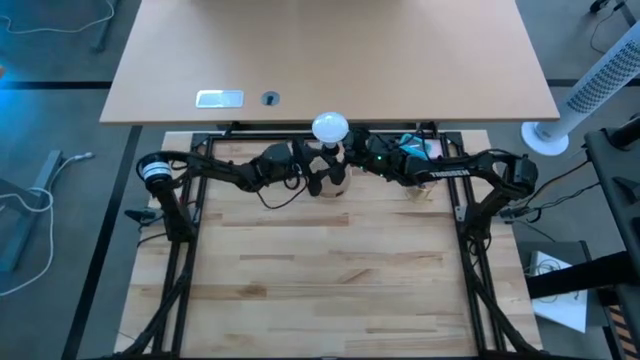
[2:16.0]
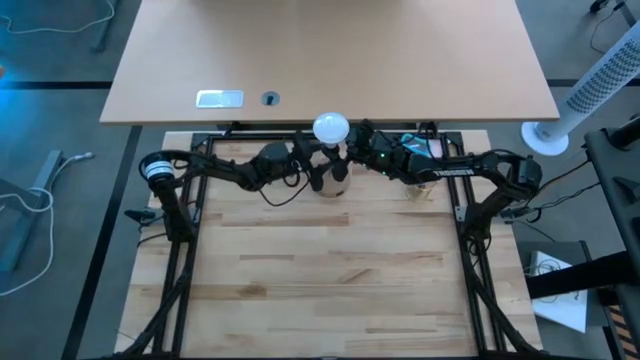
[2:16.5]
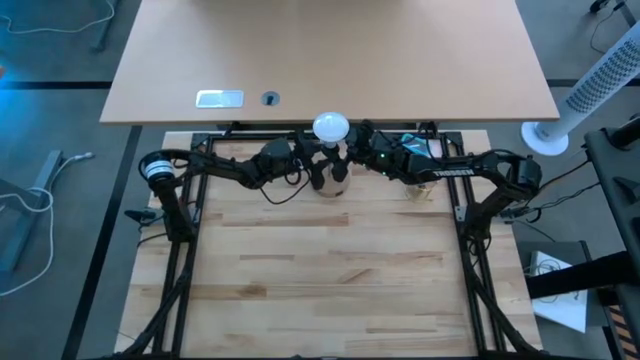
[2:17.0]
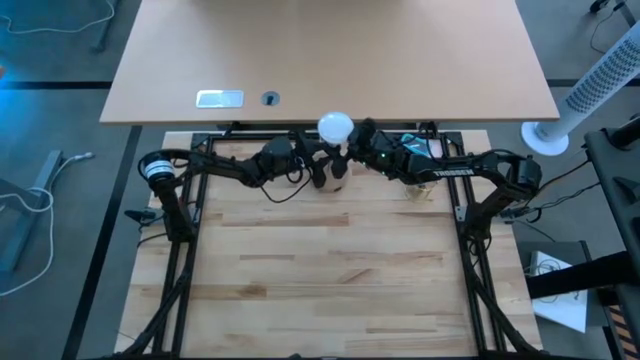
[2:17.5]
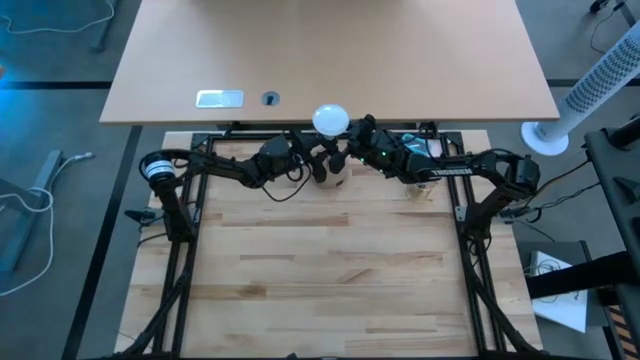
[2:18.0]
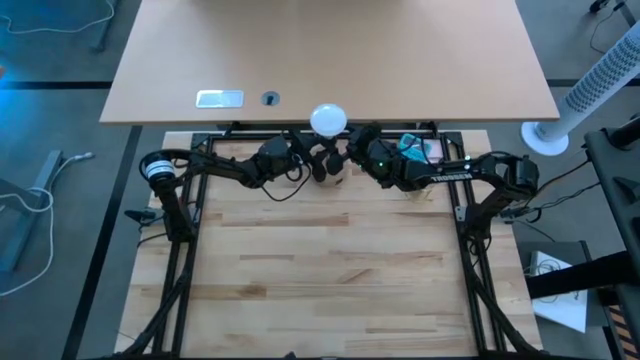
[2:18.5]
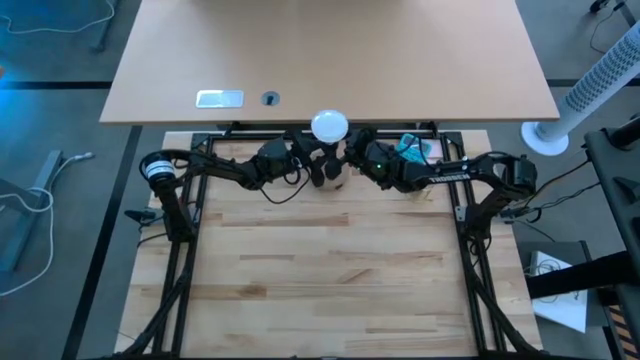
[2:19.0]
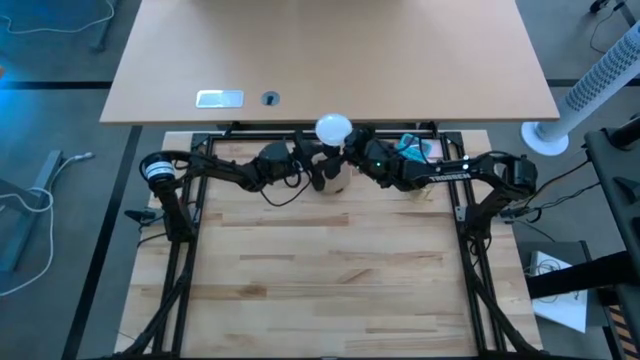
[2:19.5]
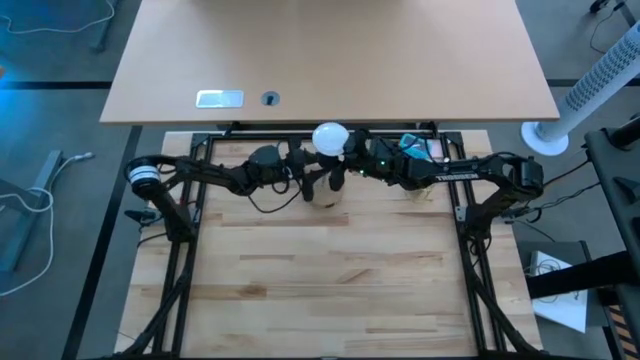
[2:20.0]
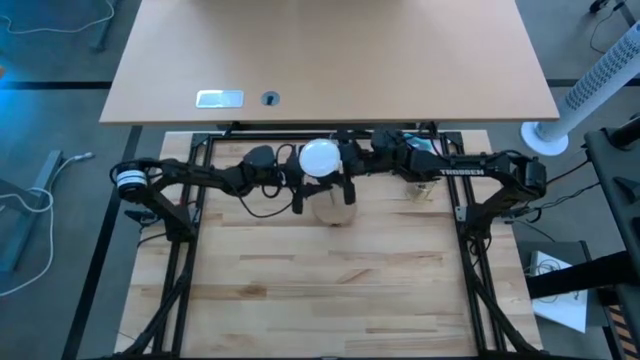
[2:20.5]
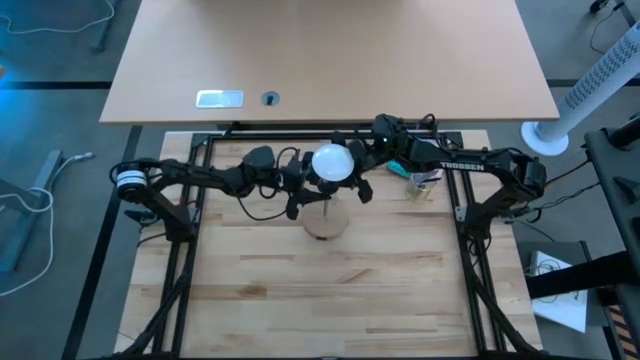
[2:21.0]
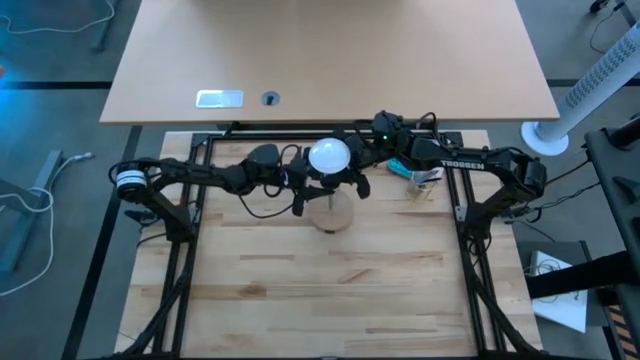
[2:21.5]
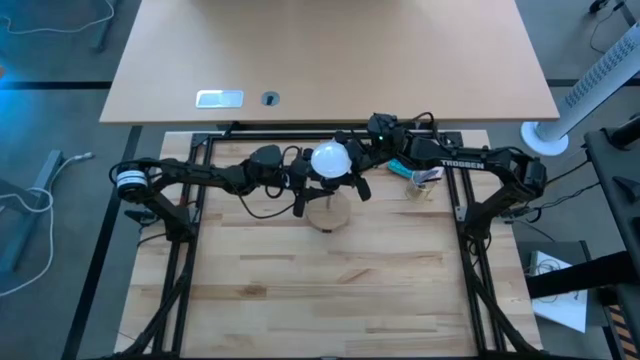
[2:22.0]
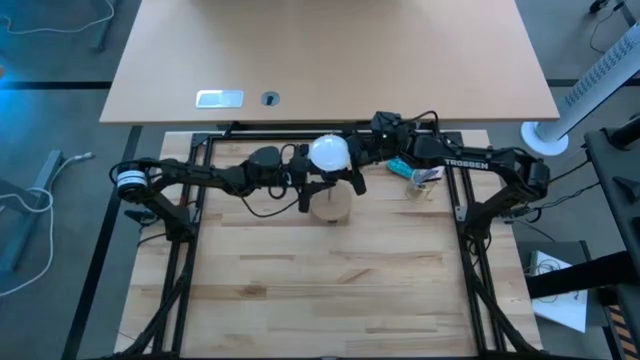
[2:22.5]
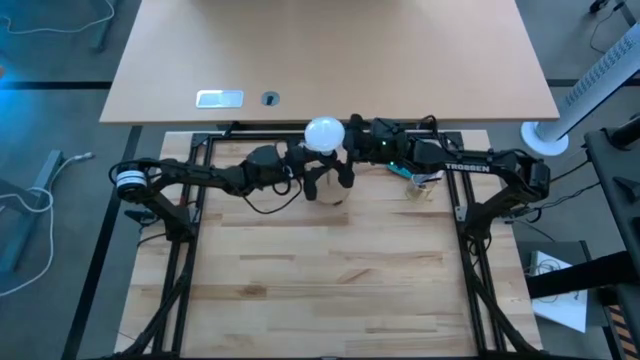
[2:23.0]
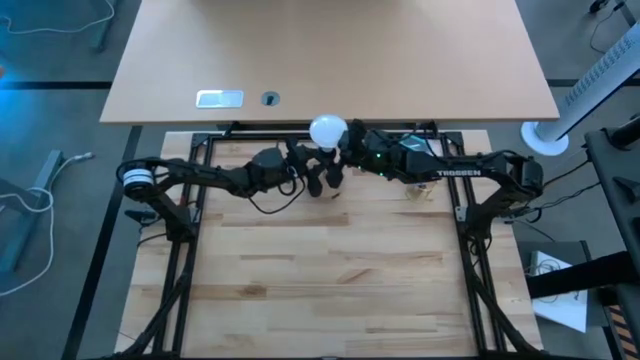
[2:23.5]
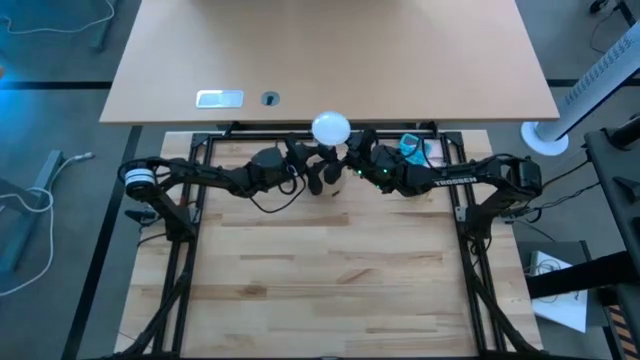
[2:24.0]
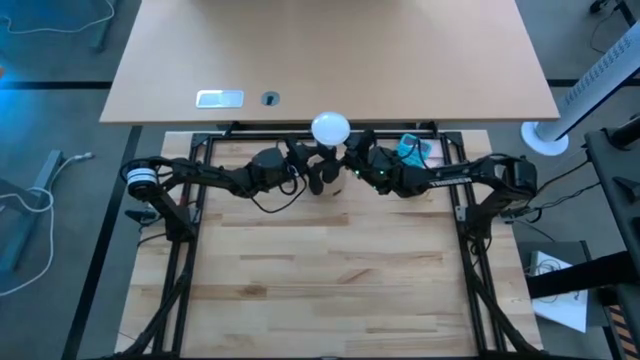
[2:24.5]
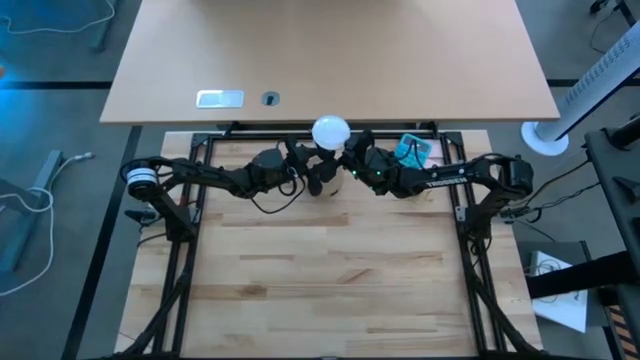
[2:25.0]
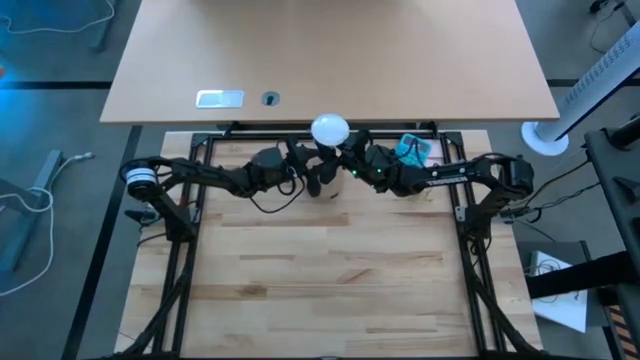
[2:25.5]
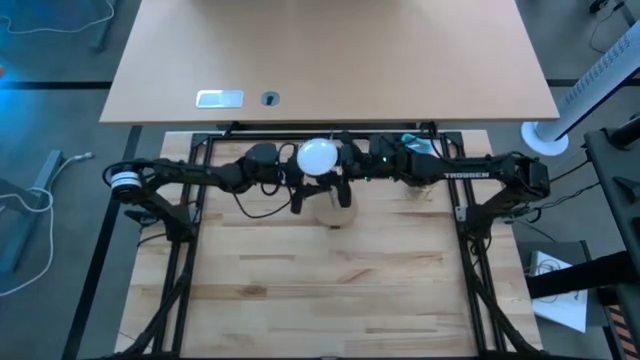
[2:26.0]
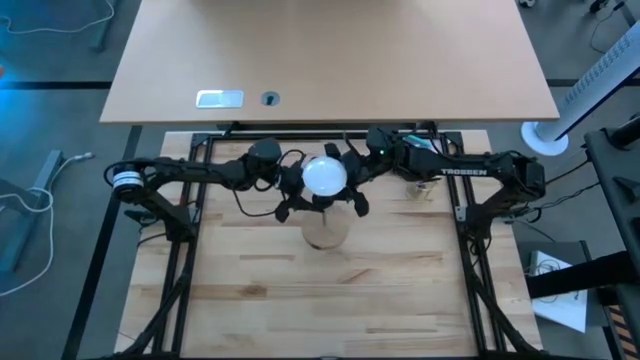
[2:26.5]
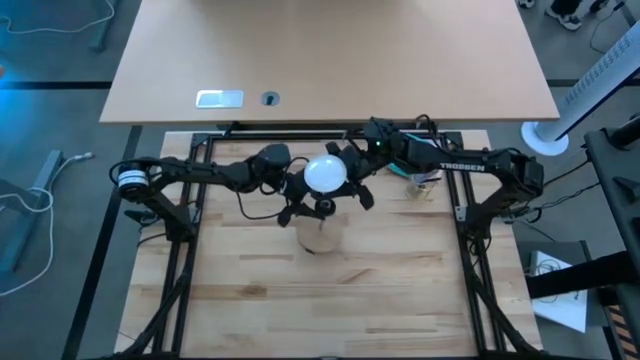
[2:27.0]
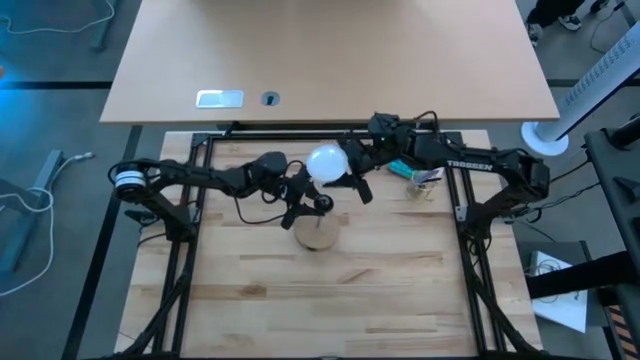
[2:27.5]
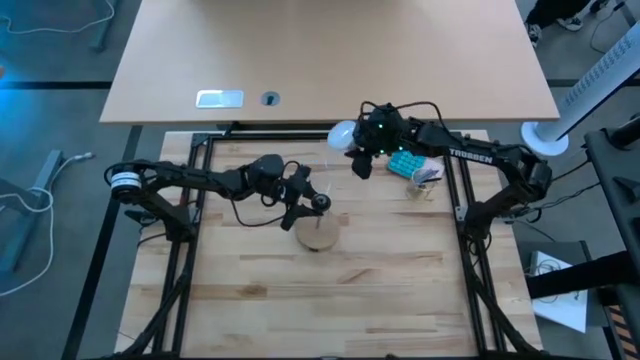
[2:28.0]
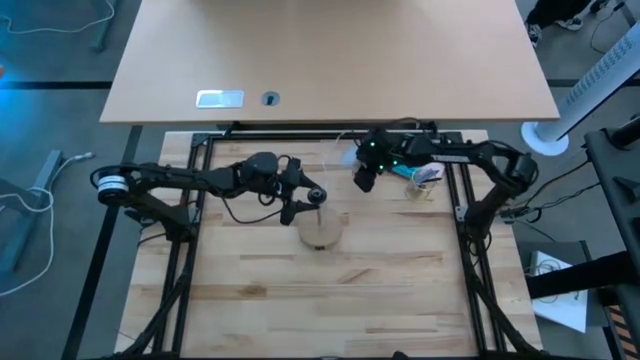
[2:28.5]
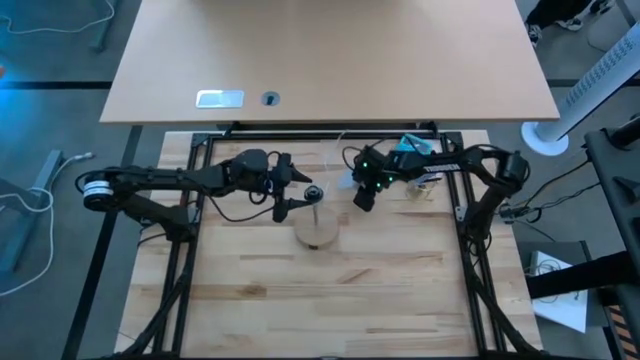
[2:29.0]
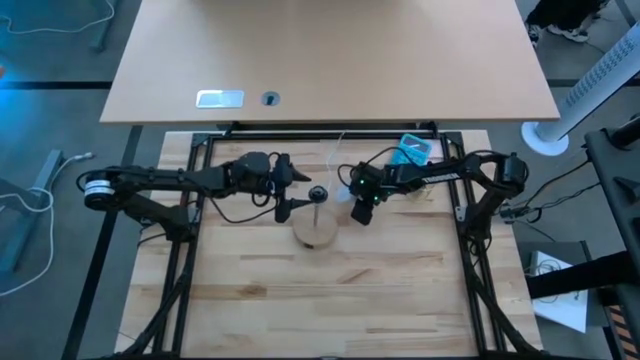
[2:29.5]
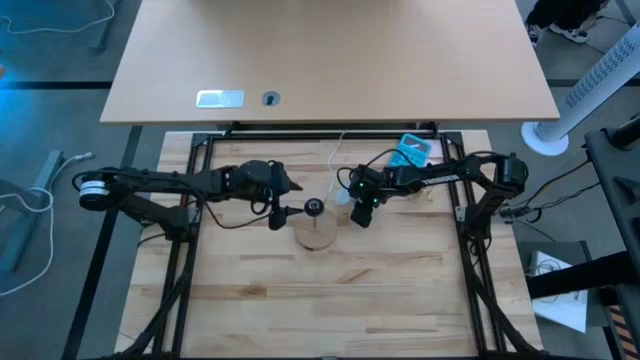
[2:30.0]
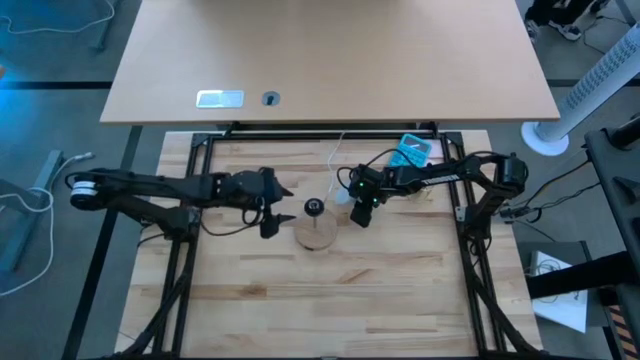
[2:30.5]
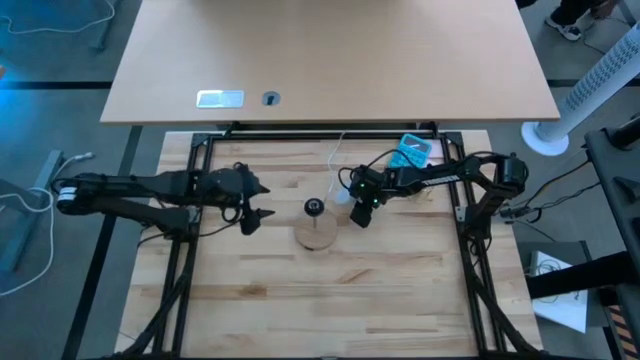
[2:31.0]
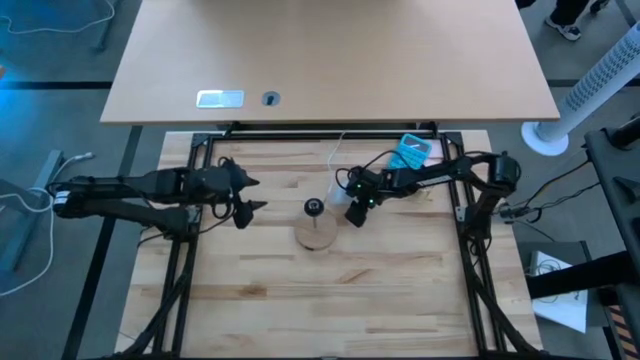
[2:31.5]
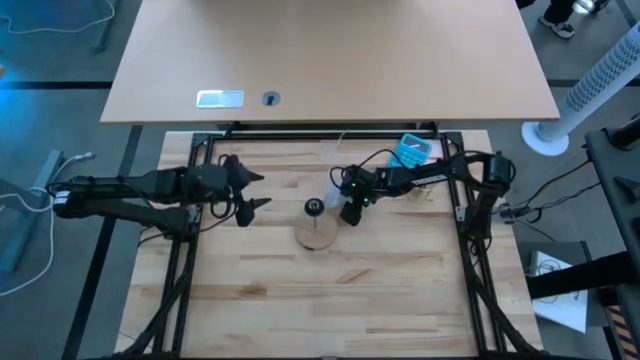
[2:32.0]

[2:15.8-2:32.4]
Task: Screw lightbulb
Remove the light bulb from the table lamp

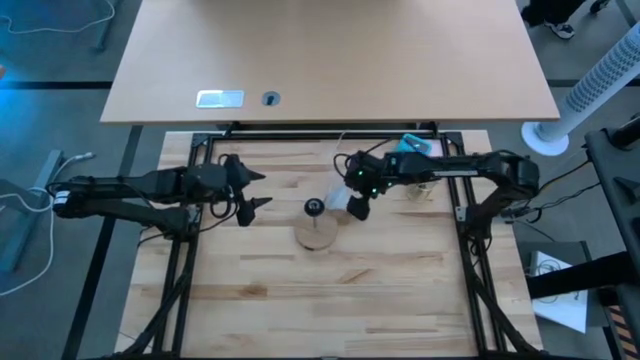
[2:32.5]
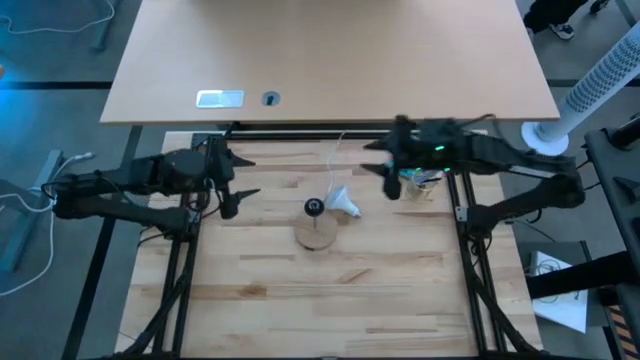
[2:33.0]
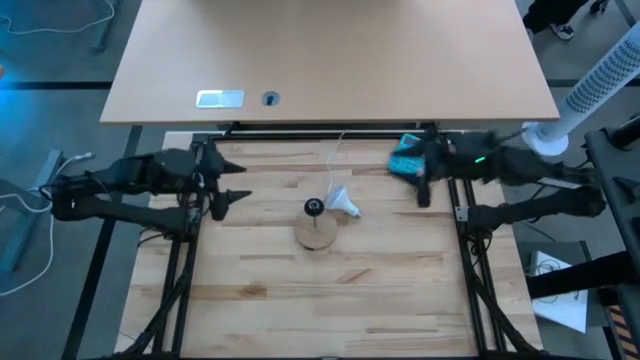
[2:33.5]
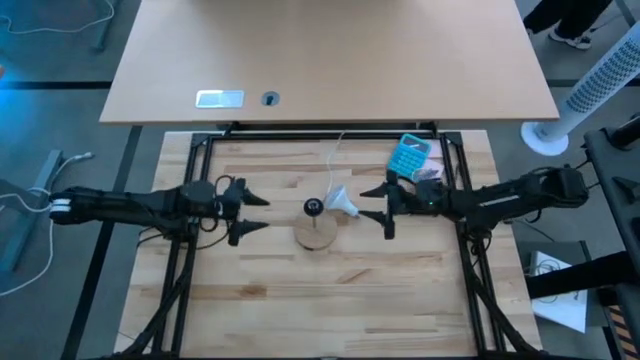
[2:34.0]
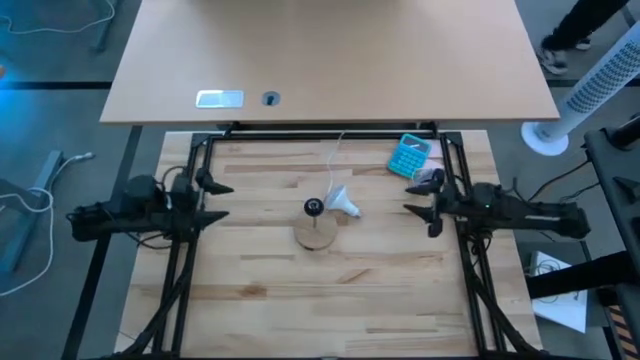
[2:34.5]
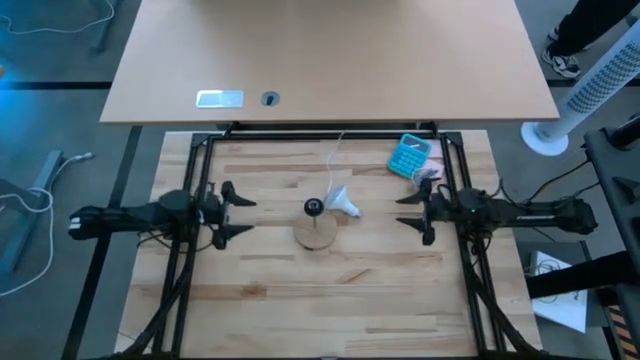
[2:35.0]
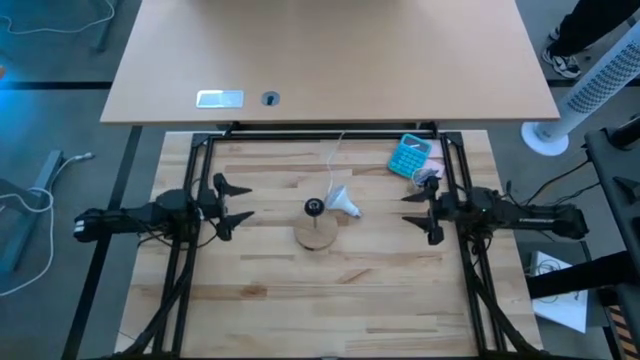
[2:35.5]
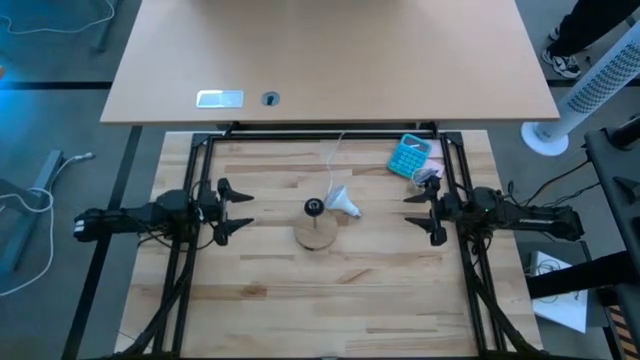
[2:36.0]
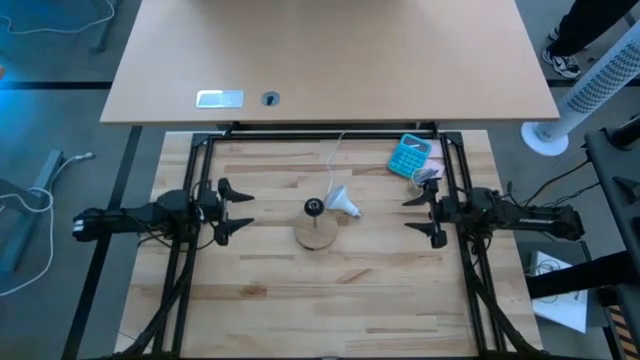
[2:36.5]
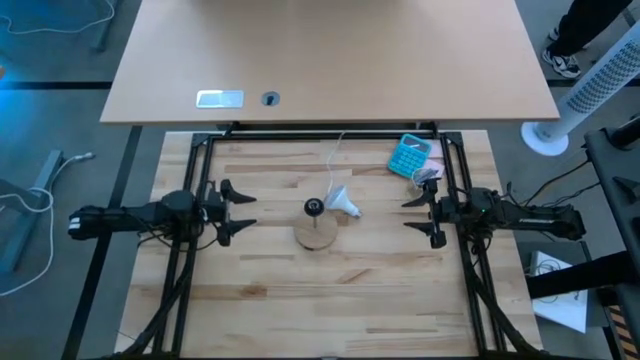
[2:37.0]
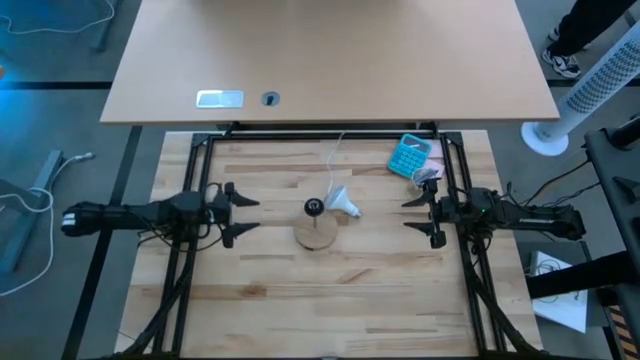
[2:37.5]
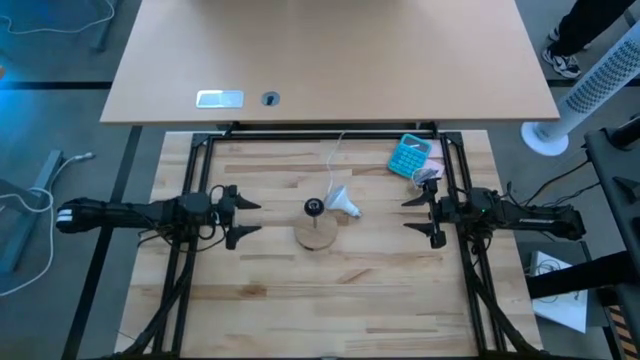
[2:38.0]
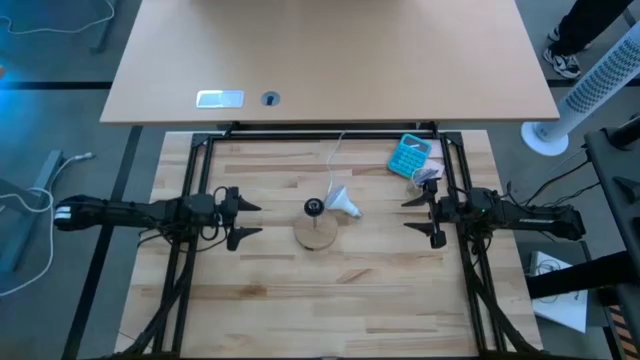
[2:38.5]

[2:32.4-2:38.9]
Return to Home Position
